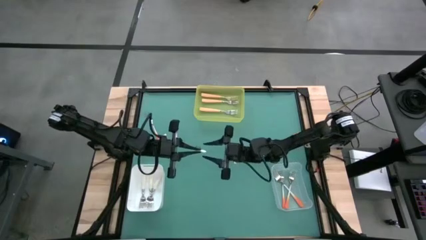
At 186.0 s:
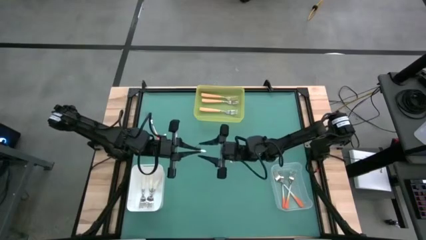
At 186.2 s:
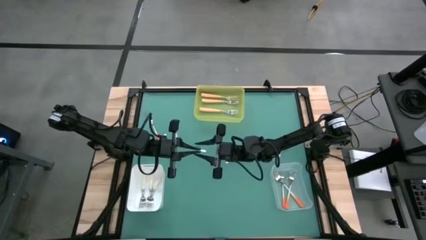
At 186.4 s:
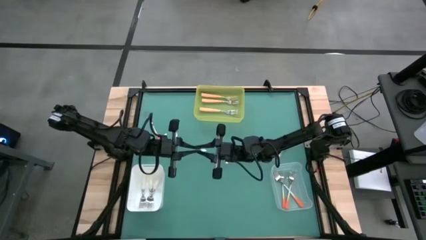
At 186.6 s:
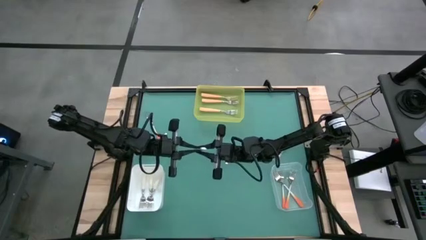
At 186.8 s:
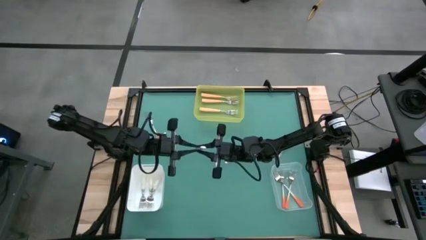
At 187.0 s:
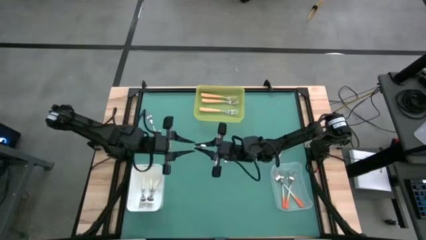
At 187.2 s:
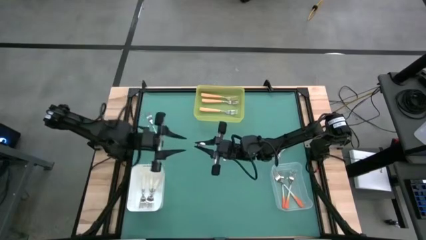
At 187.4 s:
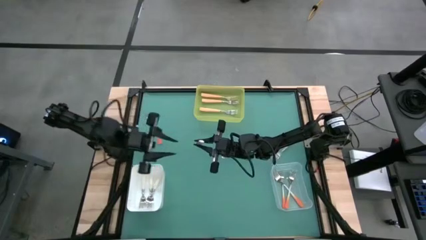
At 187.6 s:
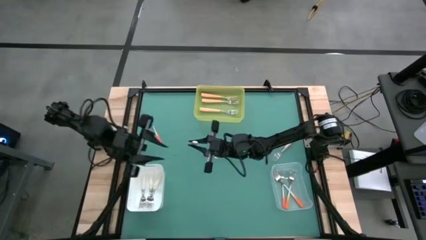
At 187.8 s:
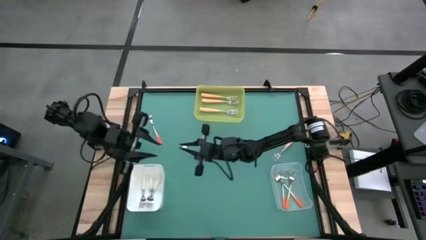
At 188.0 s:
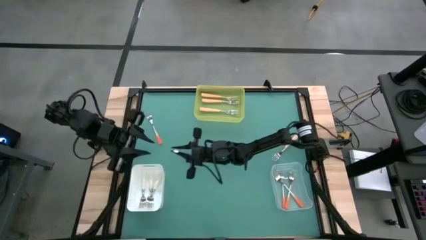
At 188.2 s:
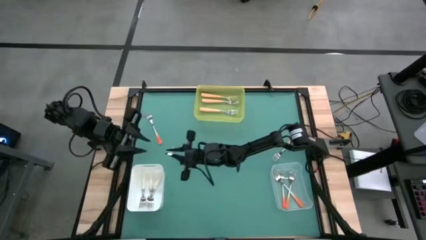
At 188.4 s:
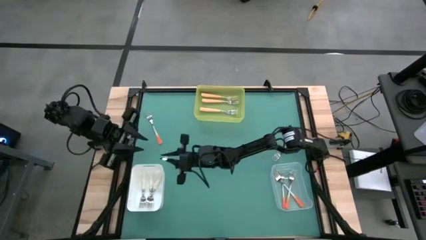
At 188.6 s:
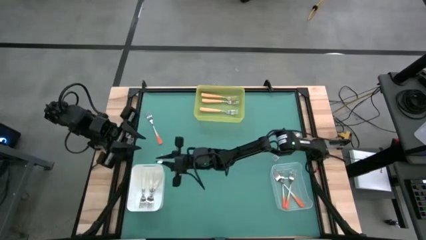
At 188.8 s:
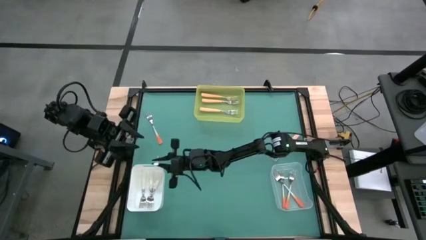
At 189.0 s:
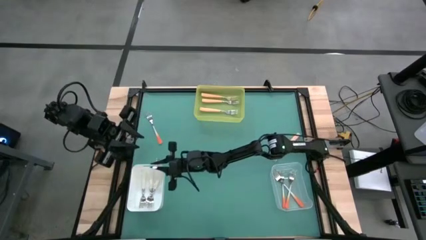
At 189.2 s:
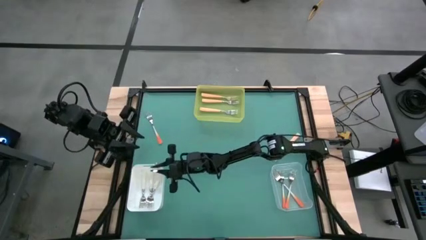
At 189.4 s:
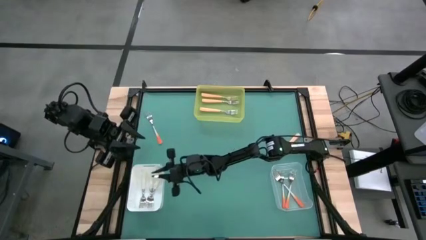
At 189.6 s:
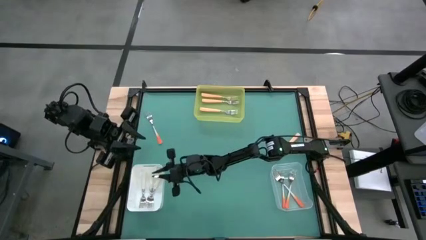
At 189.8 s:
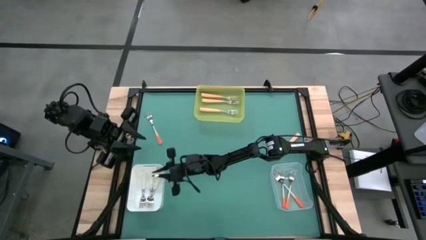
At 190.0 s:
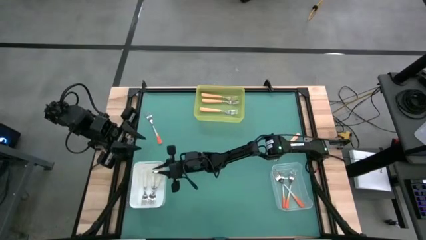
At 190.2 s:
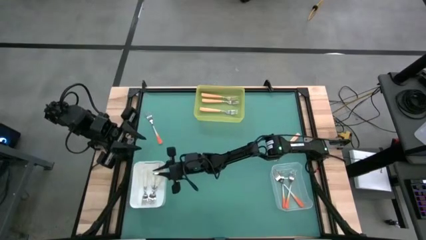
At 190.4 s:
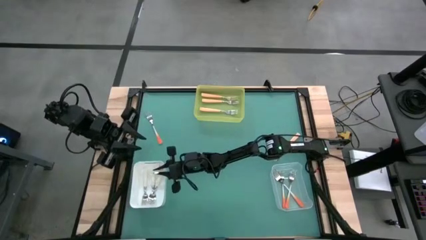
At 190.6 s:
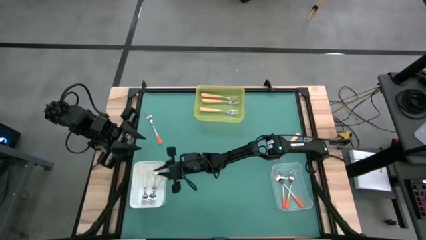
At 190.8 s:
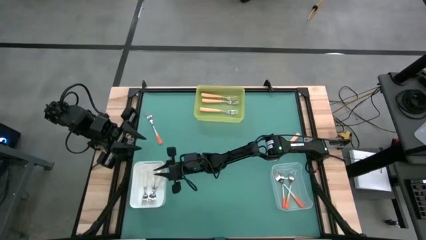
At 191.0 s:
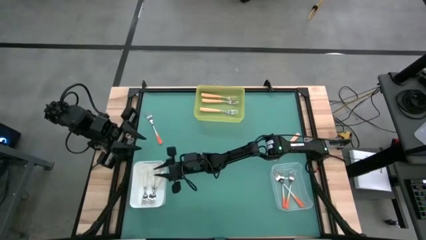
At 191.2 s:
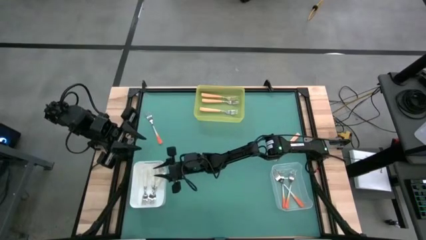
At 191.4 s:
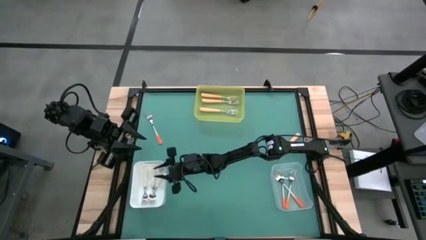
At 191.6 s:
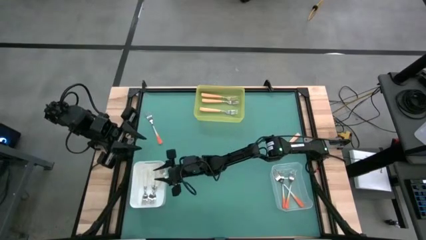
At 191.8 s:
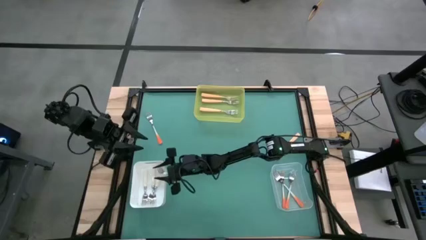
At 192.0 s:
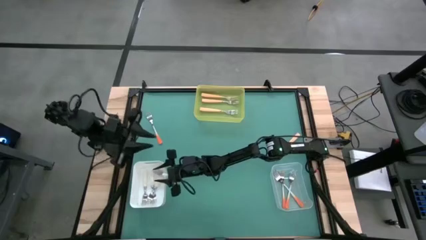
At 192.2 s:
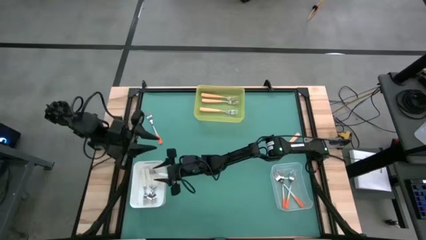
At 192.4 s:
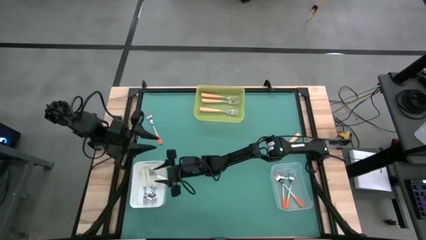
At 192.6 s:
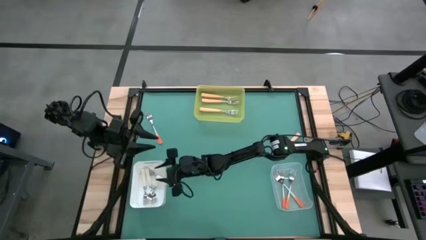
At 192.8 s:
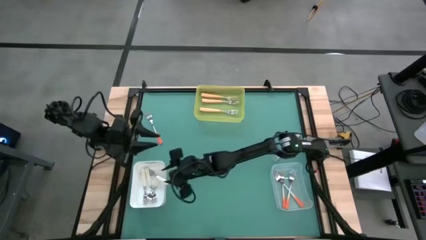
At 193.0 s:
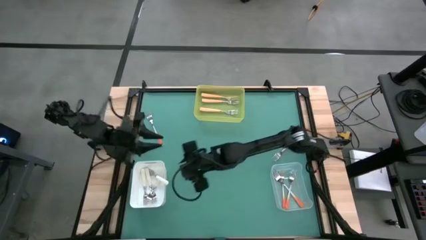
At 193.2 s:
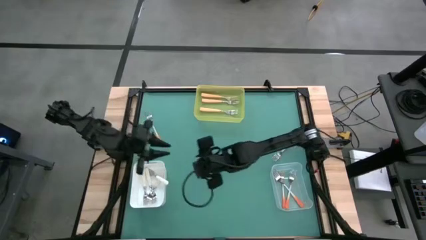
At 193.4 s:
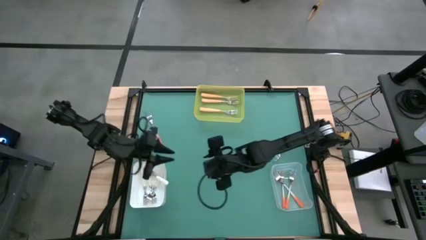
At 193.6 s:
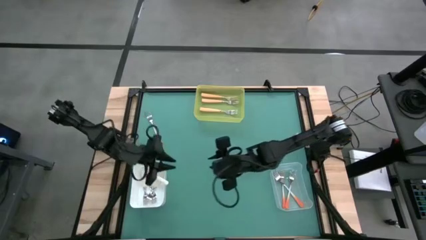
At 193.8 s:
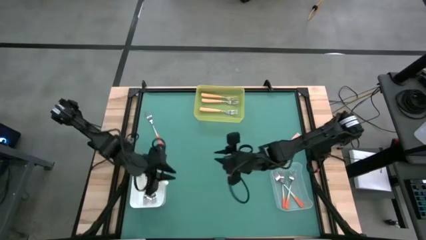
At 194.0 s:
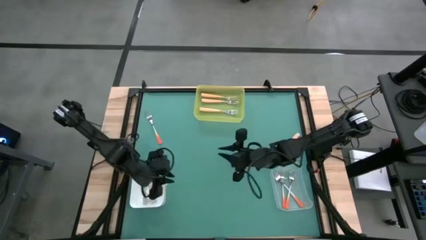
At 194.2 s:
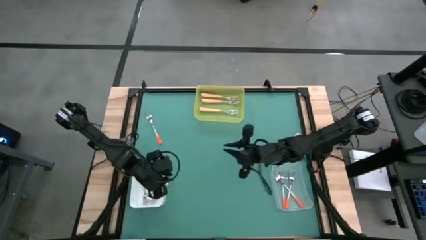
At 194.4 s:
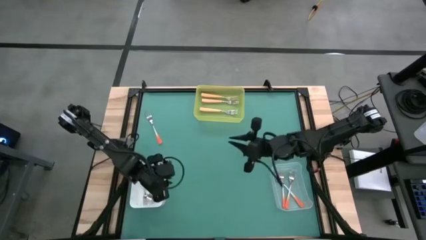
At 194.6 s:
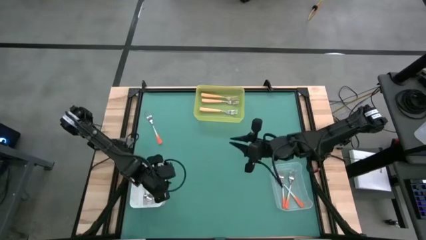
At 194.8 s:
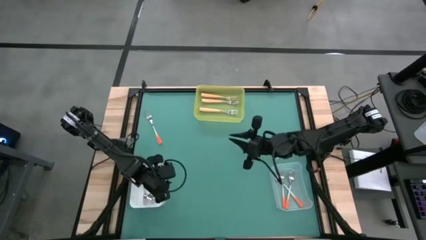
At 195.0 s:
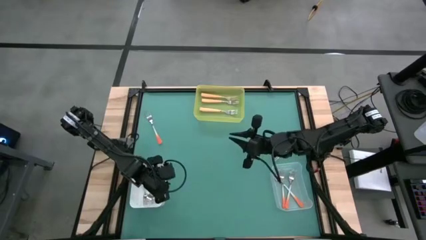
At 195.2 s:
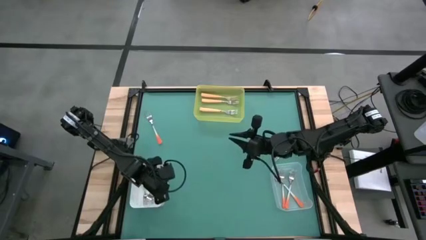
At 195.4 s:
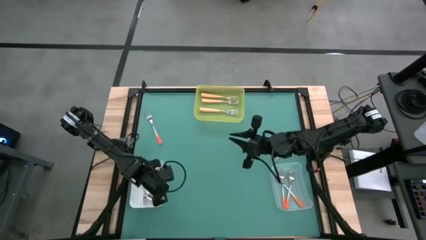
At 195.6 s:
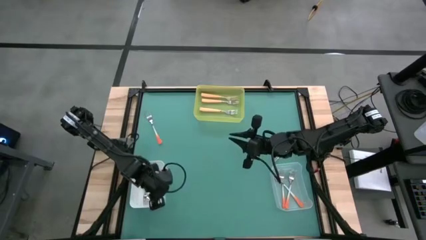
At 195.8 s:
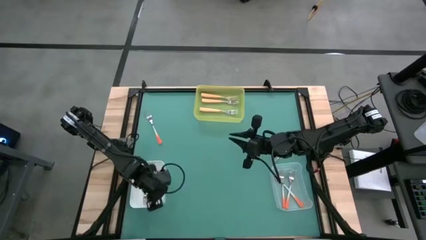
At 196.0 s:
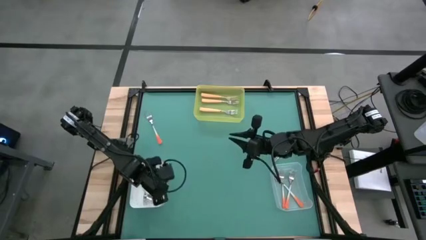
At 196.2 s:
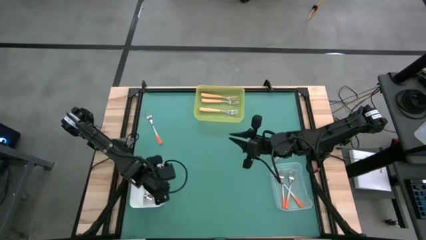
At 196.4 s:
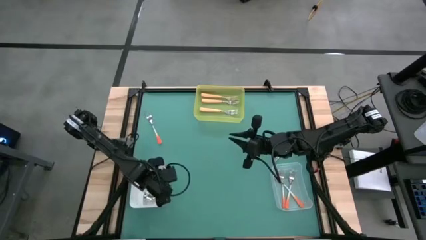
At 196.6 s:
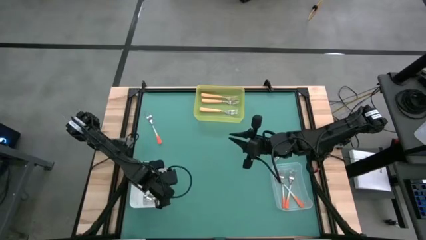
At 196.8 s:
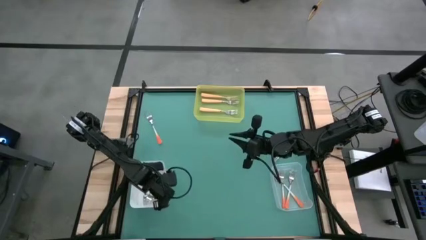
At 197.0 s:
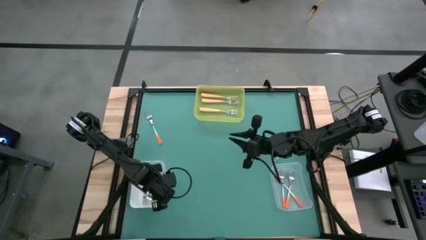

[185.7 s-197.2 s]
Task: Sort silverware by color (type)
Put the white fork into the white bin
